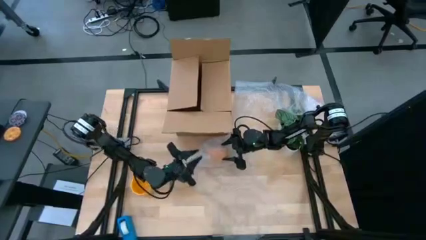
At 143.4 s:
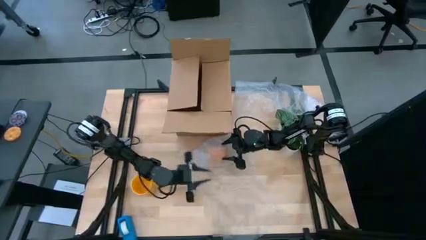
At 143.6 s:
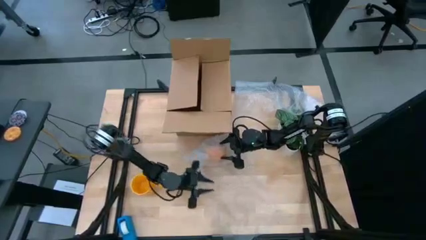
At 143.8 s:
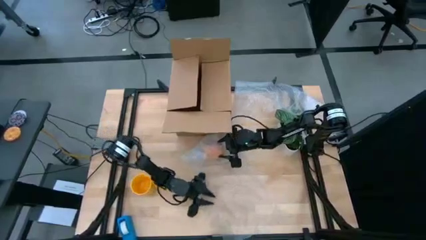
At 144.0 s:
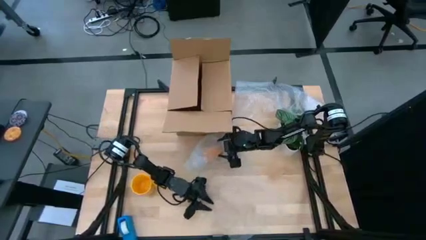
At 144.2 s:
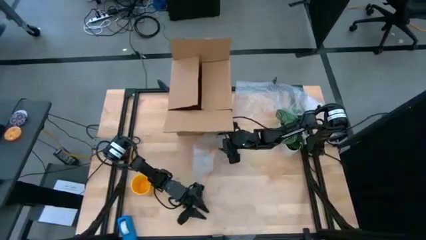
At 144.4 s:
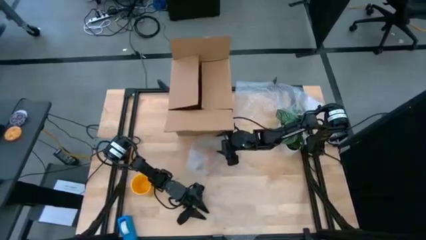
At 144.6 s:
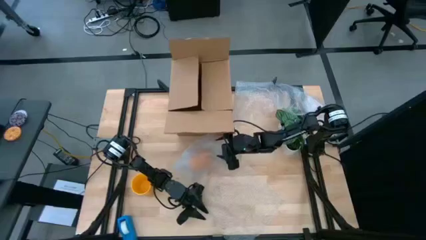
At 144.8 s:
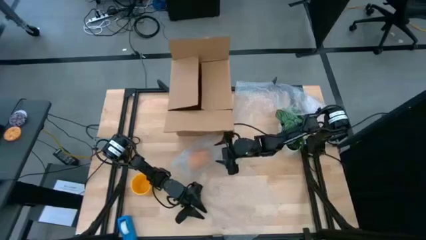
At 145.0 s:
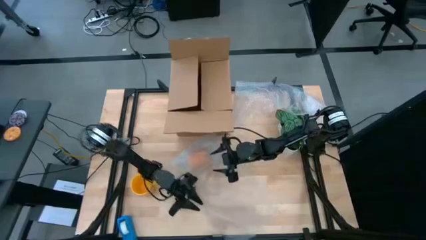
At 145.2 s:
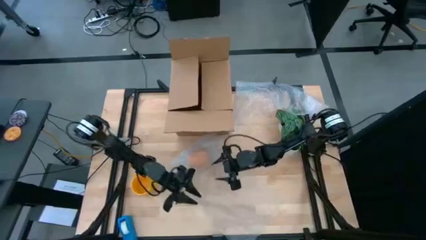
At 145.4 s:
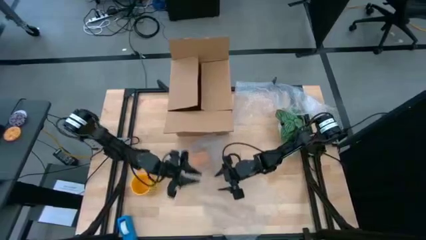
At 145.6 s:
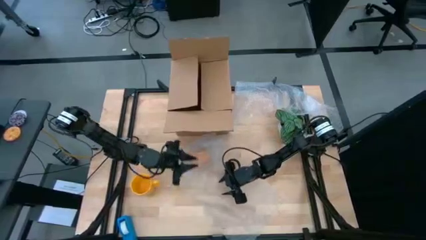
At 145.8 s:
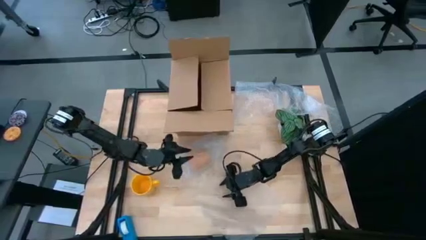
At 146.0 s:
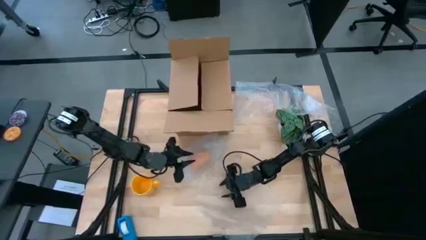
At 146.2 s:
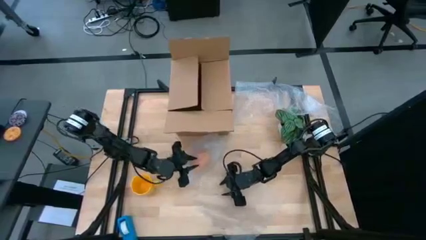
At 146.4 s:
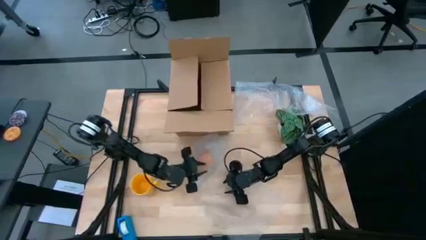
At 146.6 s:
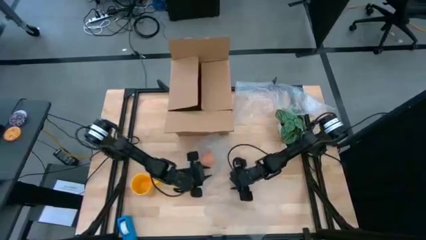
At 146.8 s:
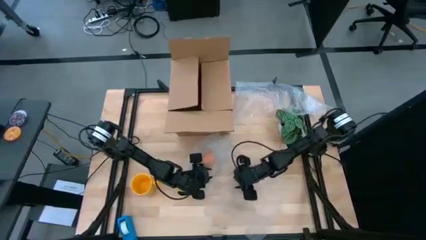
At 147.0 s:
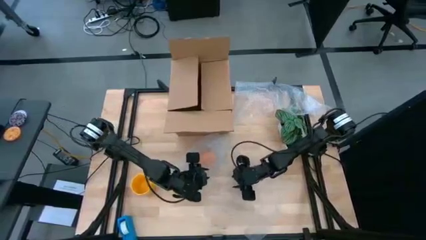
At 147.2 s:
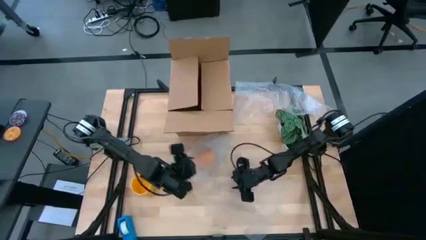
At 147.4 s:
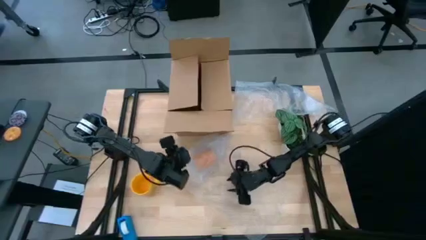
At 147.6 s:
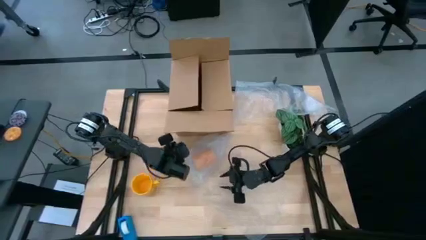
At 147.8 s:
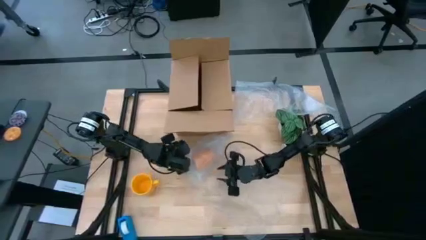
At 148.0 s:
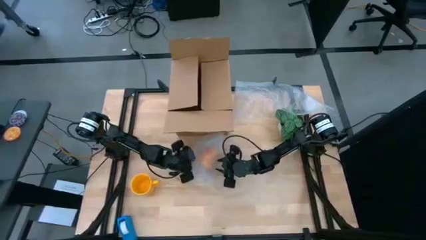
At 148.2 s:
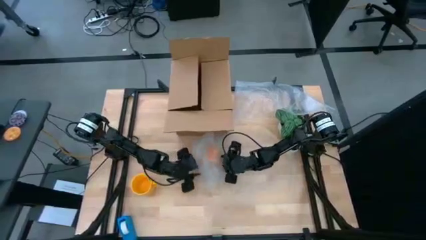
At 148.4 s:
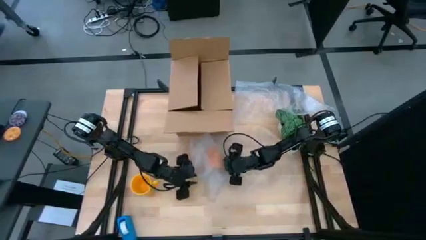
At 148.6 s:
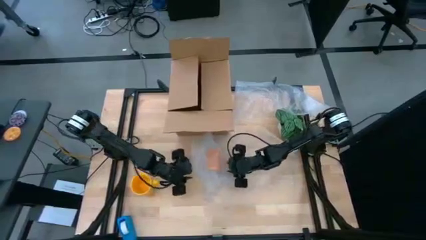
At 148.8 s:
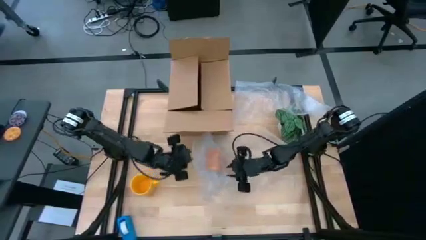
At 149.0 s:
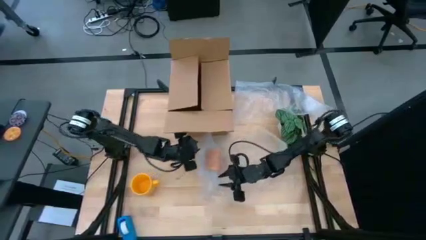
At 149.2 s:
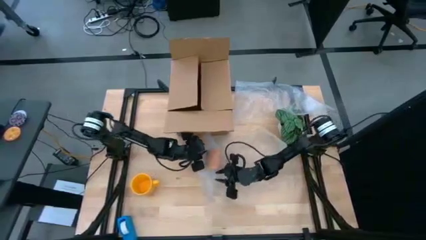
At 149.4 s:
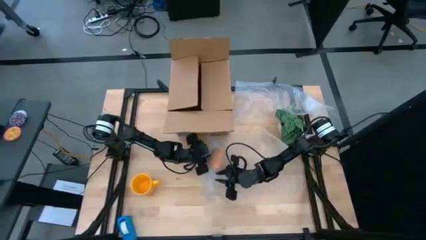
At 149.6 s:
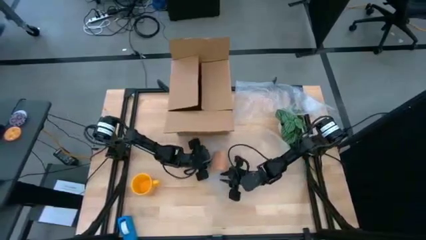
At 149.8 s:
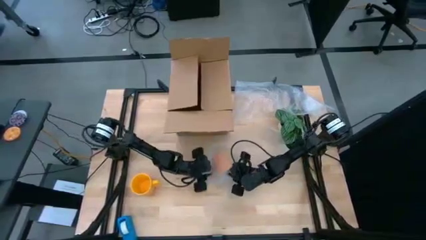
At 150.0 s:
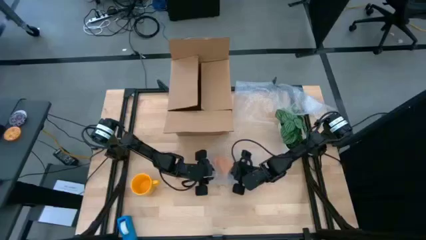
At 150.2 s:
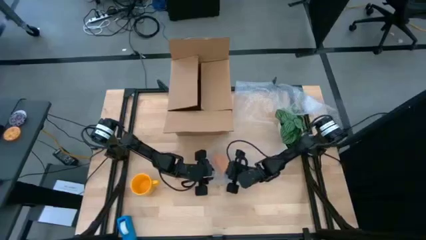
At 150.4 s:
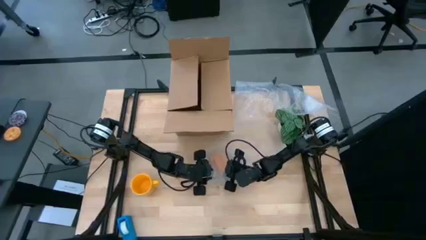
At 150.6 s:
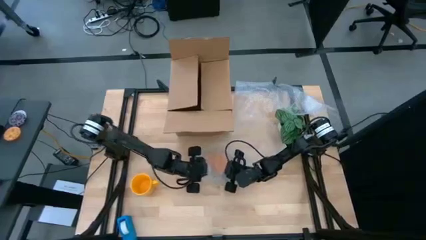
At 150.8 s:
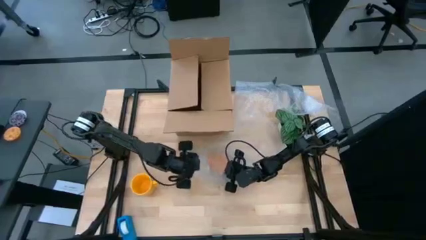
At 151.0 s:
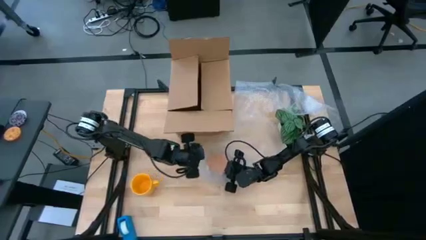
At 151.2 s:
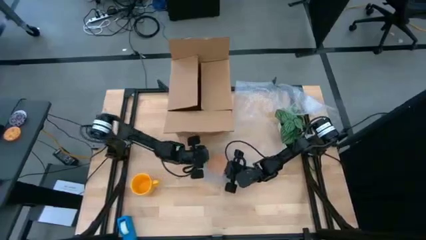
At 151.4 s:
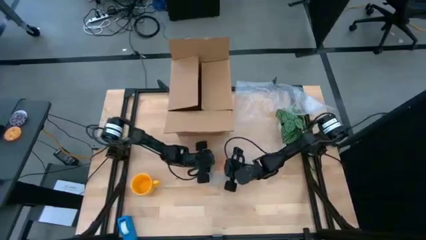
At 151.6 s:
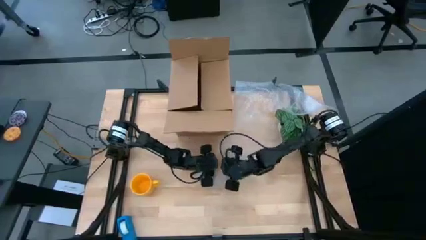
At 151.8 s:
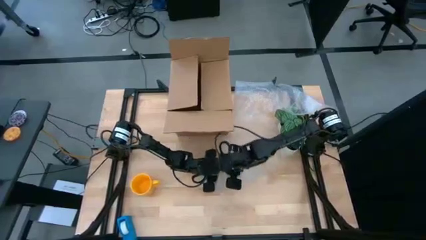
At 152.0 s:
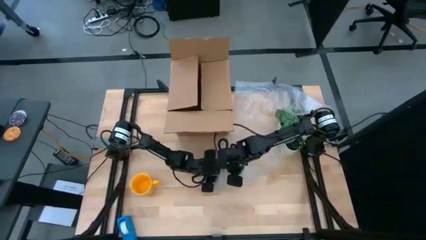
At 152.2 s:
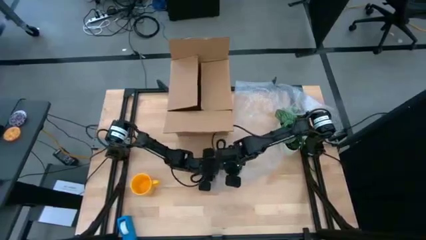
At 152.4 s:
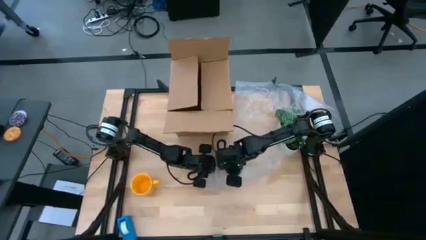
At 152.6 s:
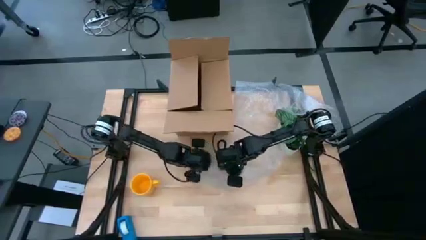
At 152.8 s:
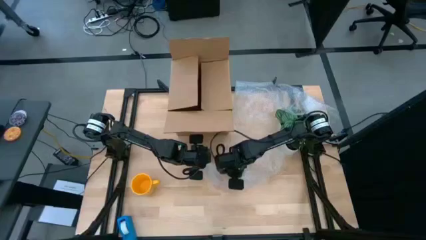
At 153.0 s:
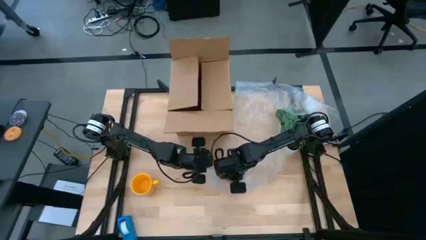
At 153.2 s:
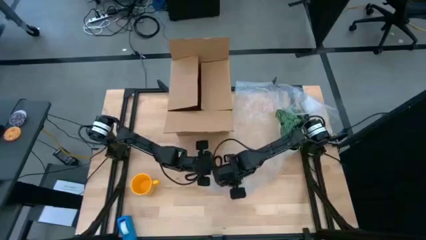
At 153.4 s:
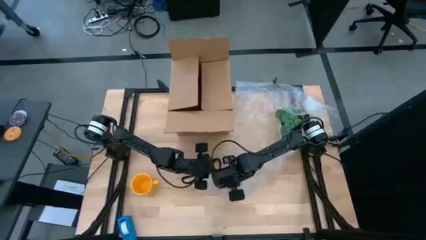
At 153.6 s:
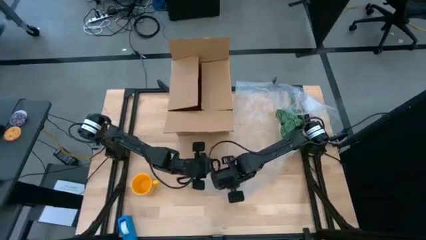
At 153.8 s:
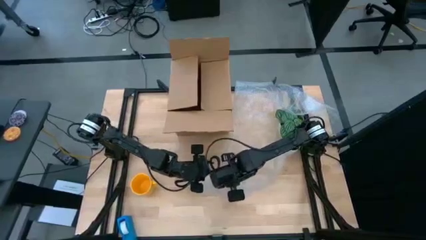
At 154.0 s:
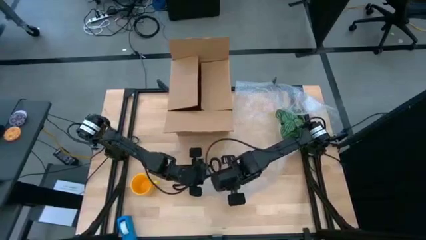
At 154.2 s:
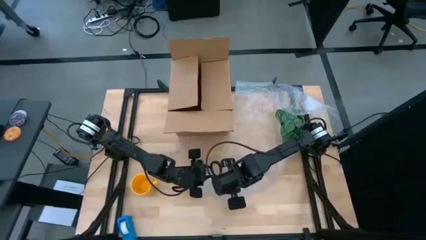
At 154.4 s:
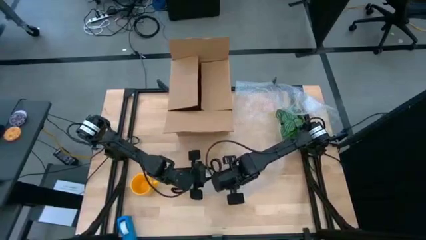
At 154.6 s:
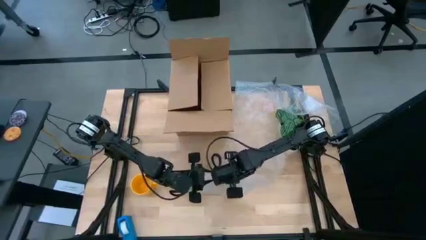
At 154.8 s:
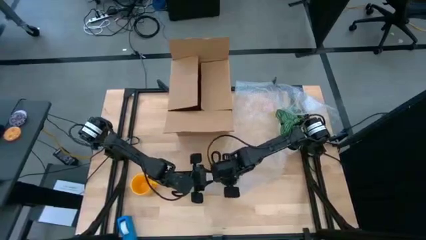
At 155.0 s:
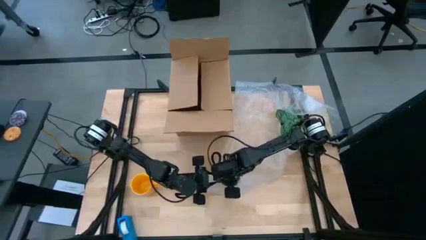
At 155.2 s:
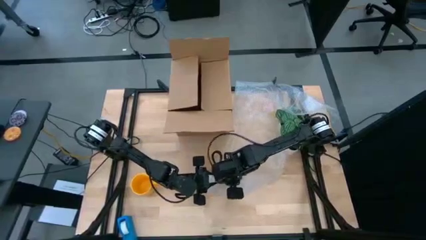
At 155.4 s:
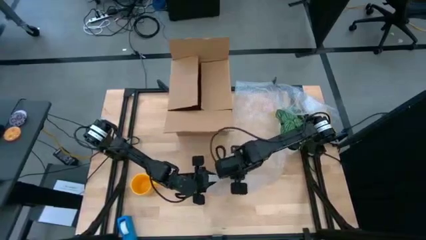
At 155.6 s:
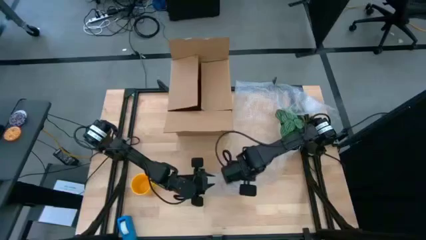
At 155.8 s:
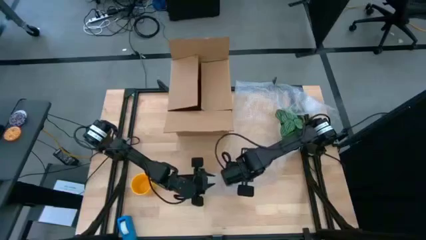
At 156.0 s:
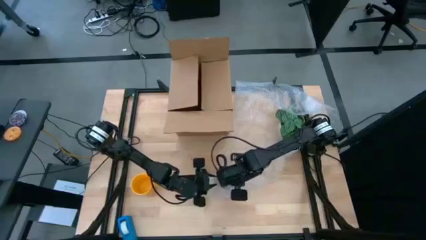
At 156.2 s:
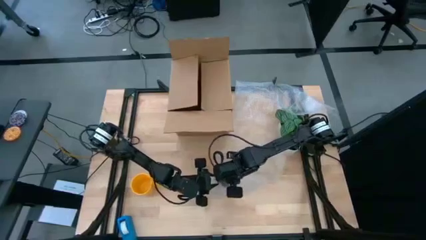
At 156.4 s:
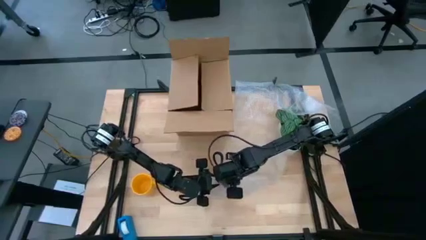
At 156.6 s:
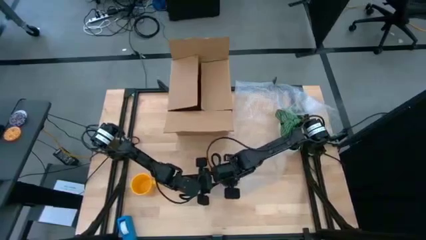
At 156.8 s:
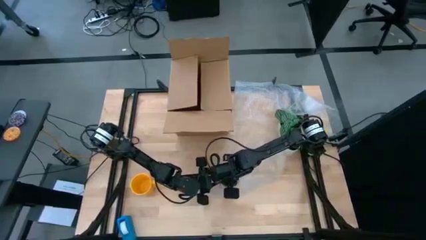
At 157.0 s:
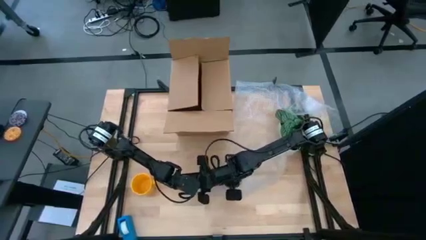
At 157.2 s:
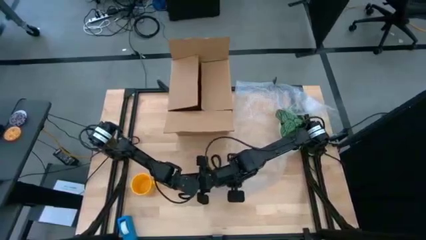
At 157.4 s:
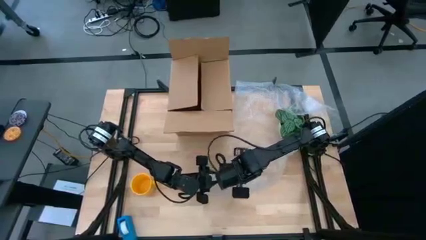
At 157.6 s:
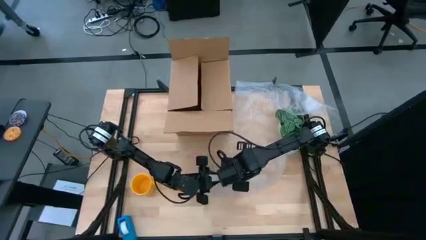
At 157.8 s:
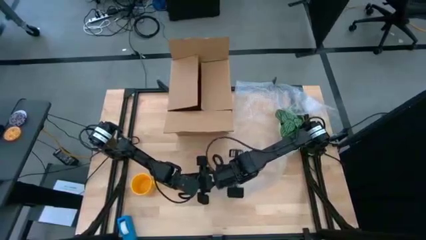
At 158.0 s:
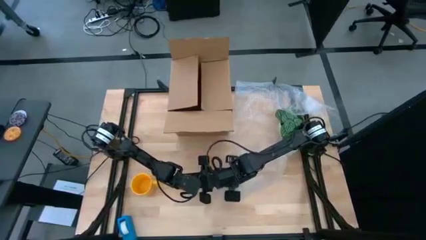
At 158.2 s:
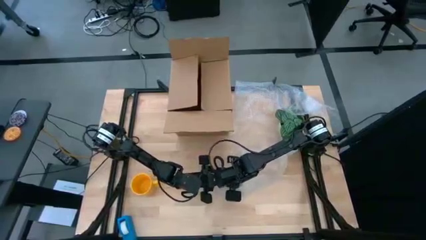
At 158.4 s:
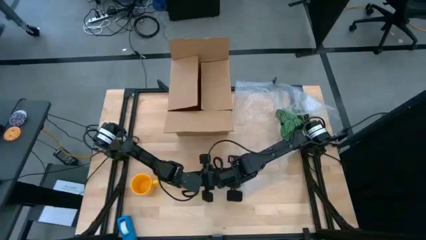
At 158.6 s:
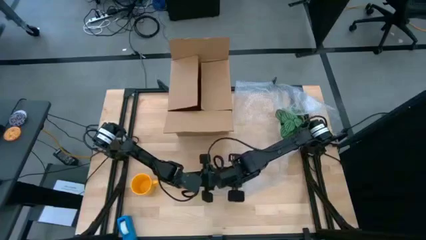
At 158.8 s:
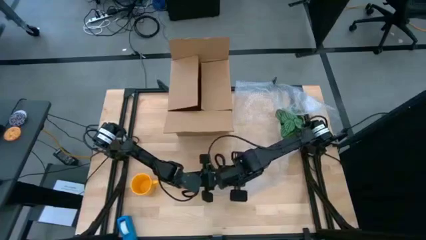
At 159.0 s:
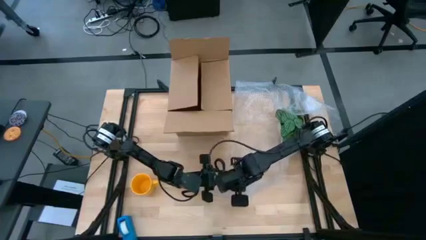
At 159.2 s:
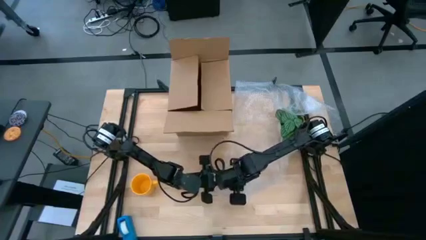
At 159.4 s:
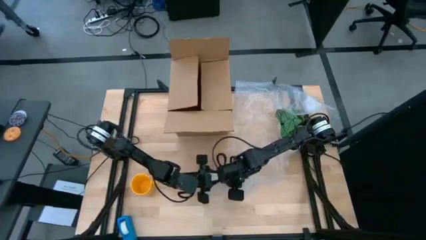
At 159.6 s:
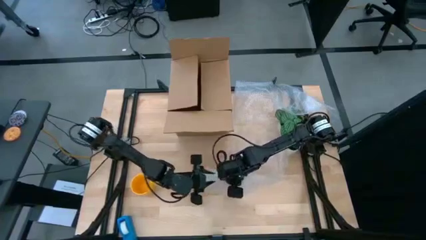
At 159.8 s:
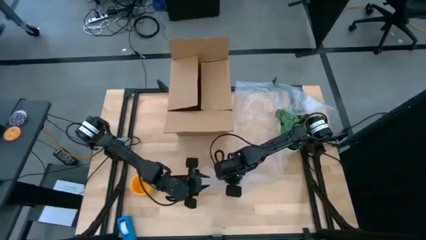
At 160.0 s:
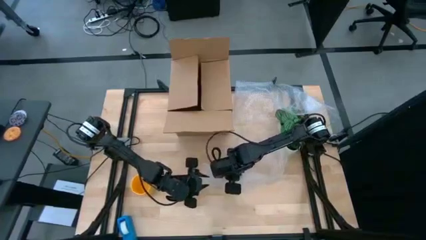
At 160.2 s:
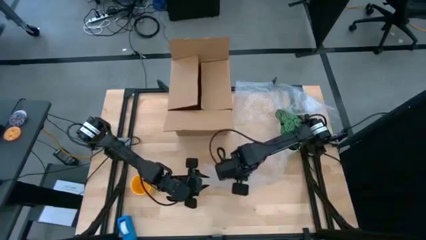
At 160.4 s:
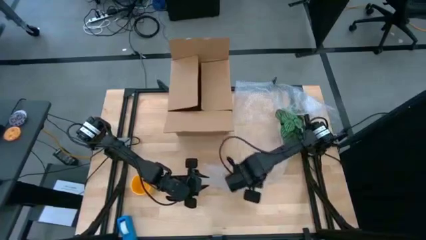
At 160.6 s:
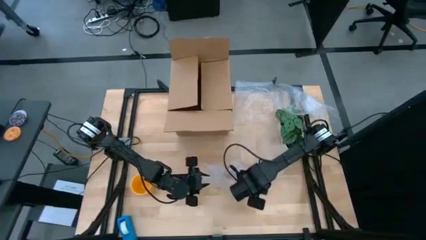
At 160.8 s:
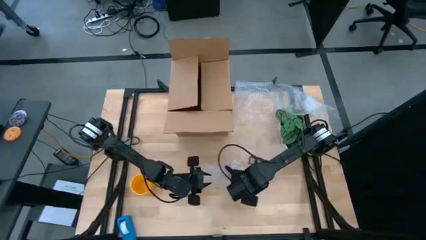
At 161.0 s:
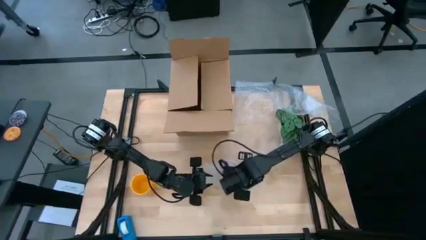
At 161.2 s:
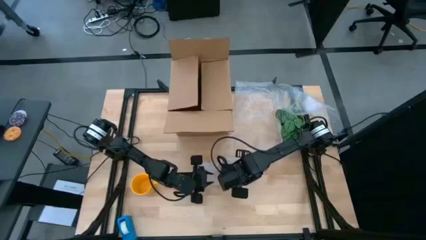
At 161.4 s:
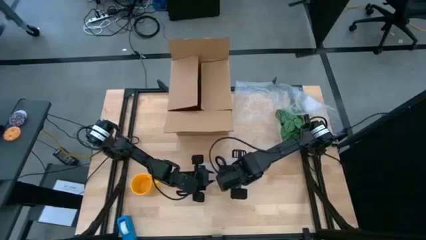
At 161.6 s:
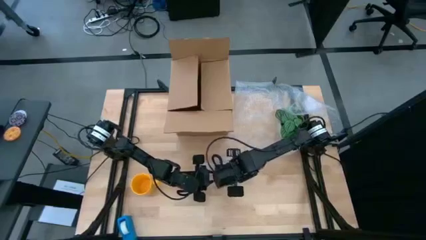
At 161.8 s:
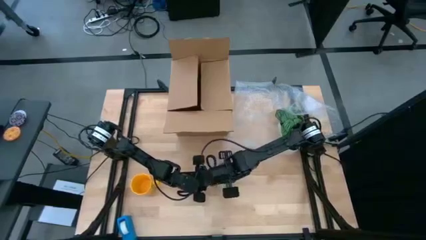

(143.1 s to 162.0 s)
Task: wrap mug
Wrap the orange cup with the bubble wrap
